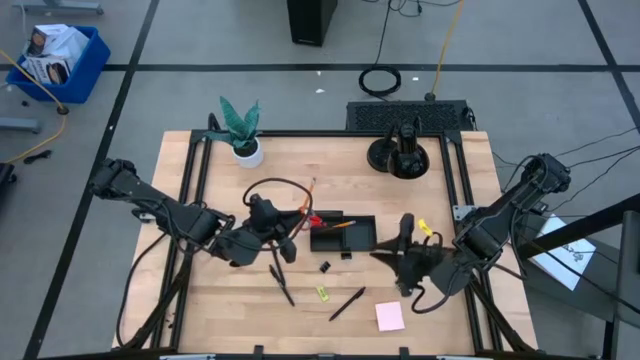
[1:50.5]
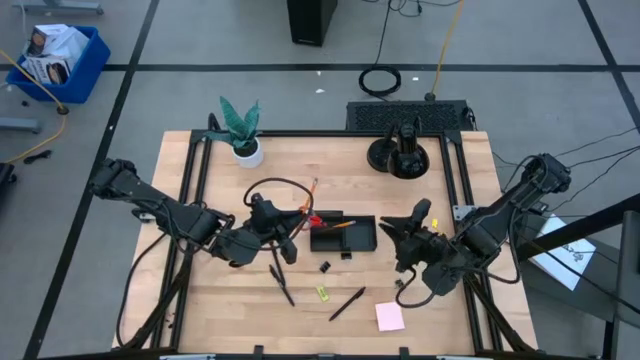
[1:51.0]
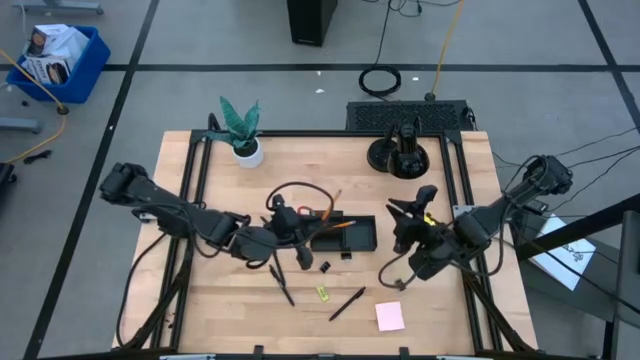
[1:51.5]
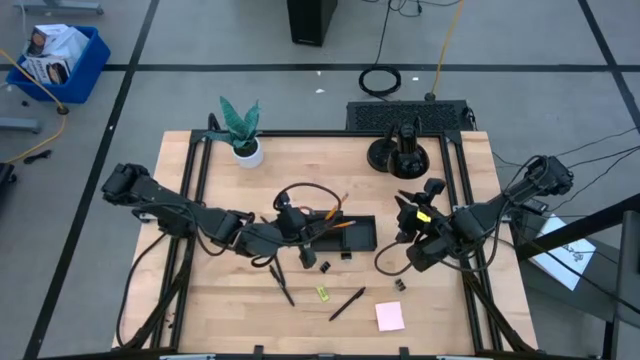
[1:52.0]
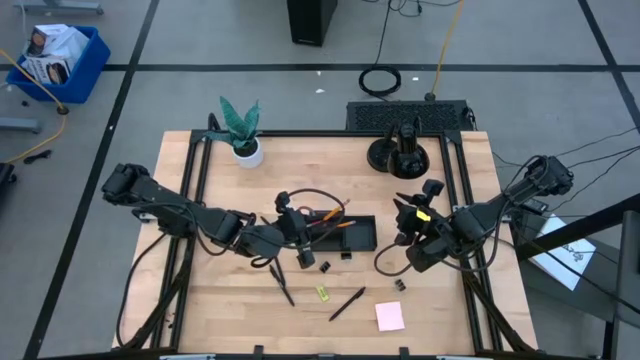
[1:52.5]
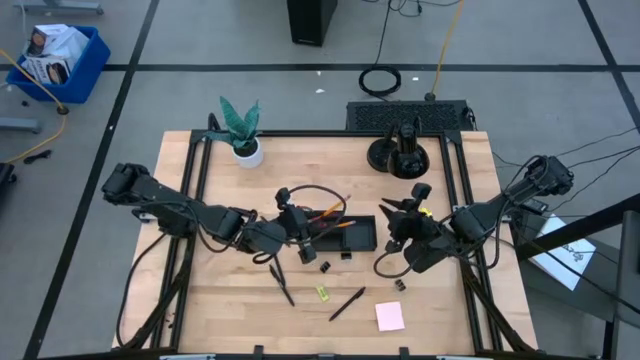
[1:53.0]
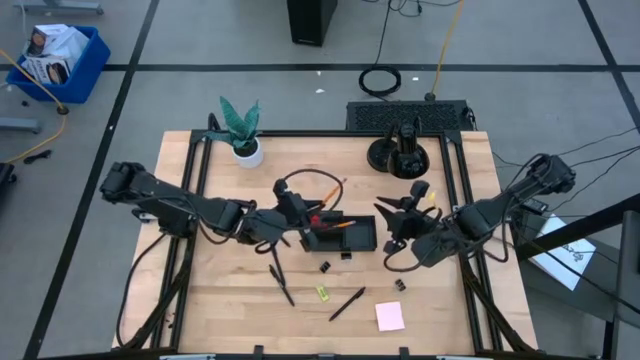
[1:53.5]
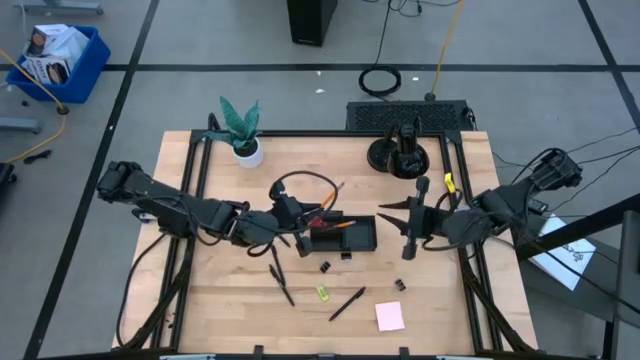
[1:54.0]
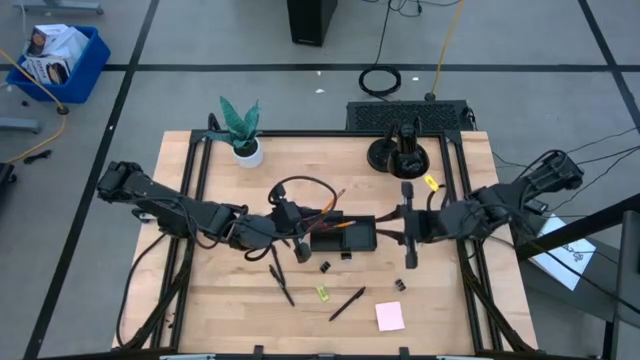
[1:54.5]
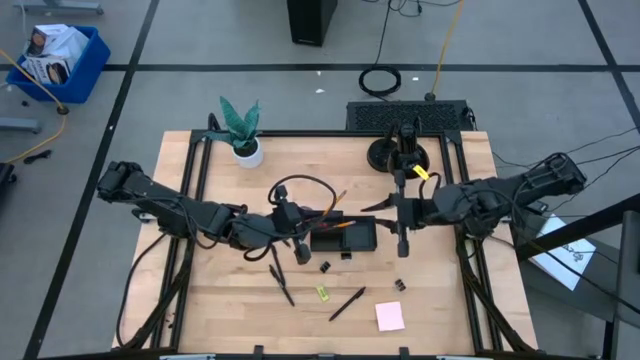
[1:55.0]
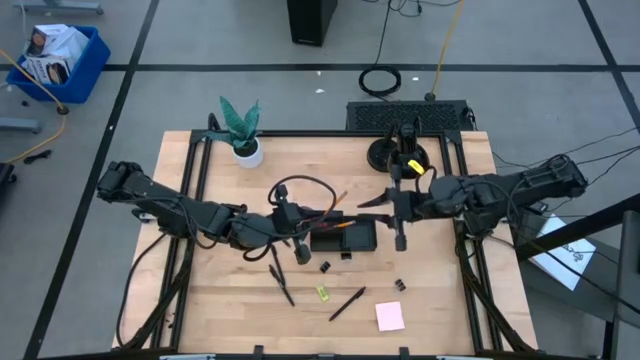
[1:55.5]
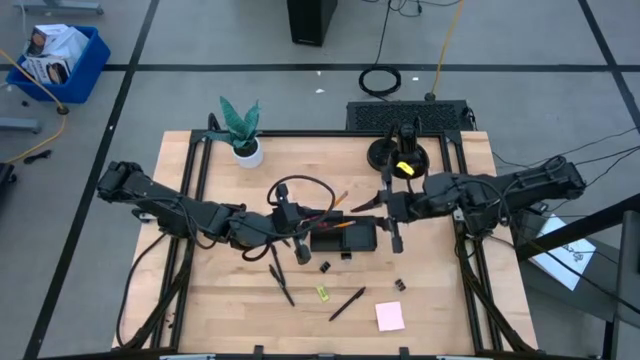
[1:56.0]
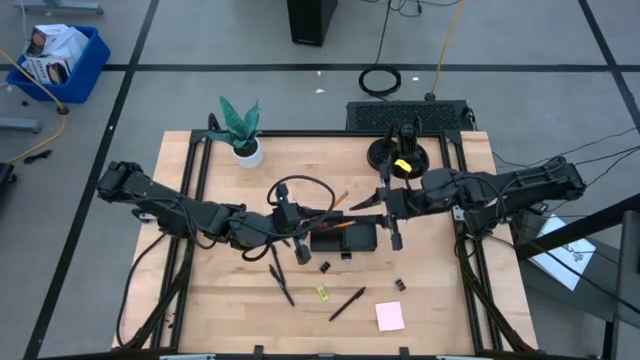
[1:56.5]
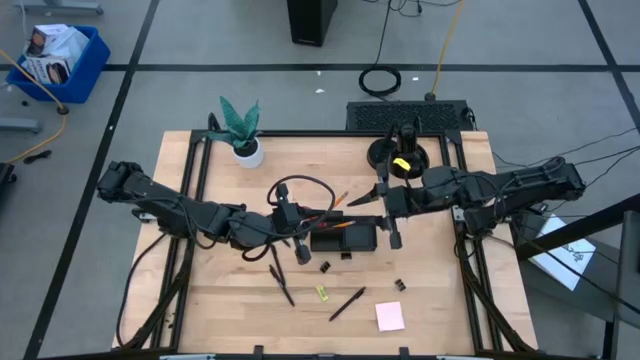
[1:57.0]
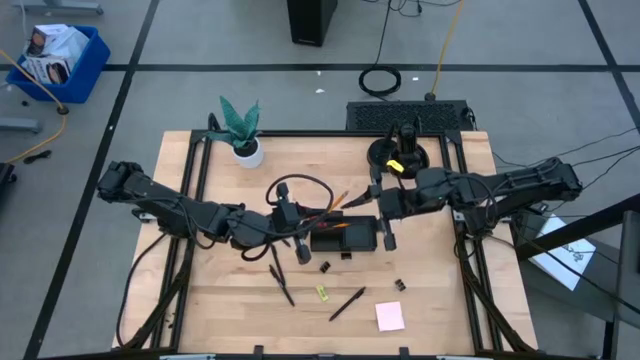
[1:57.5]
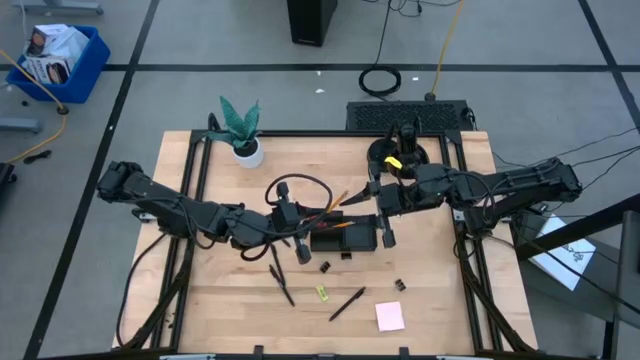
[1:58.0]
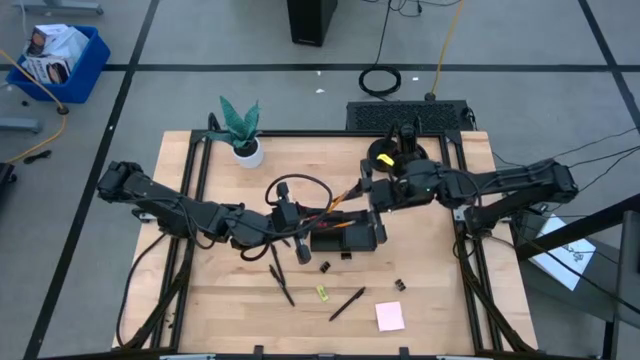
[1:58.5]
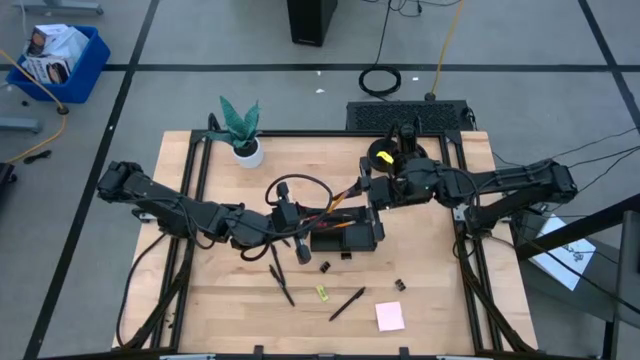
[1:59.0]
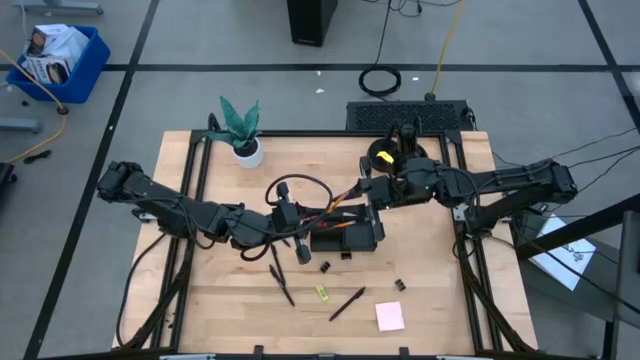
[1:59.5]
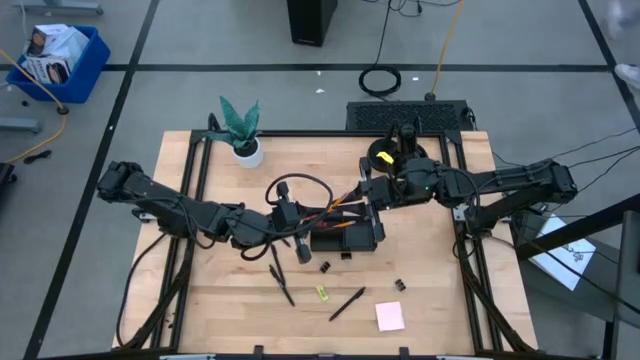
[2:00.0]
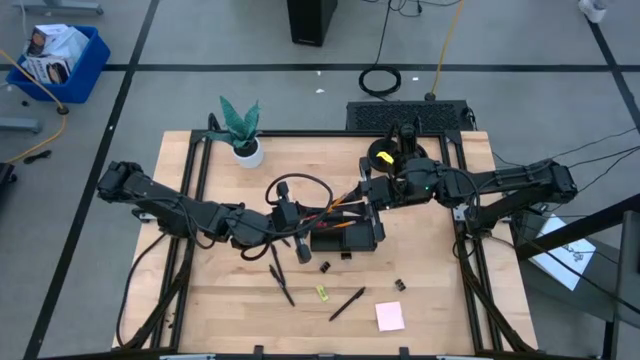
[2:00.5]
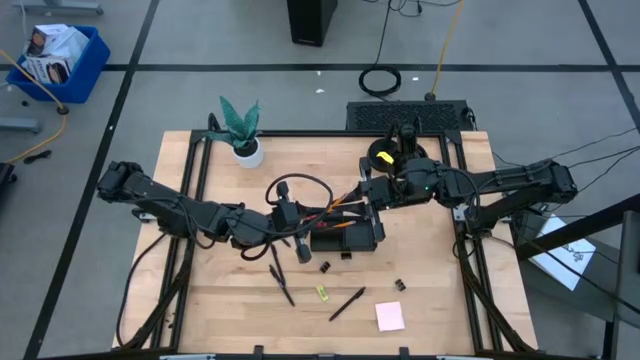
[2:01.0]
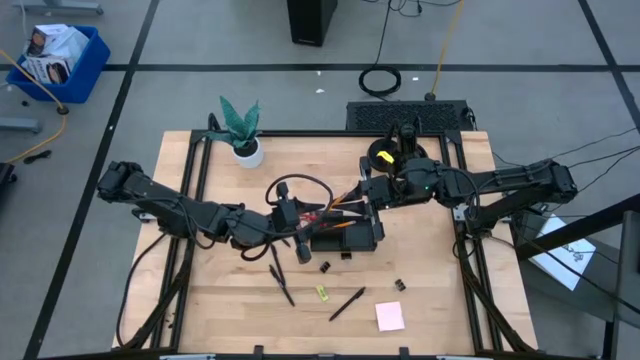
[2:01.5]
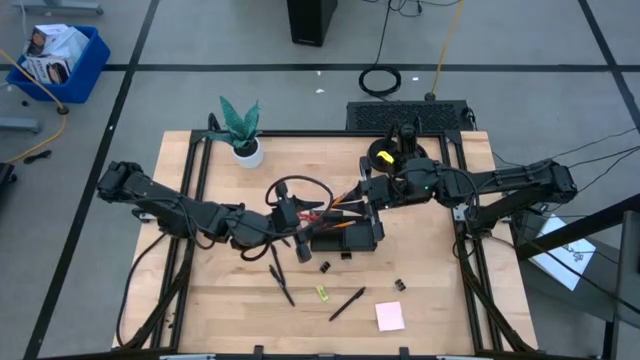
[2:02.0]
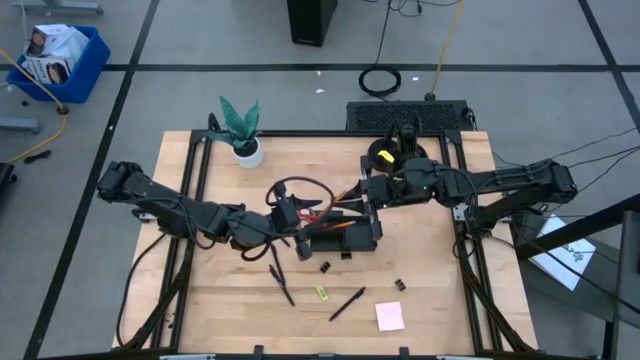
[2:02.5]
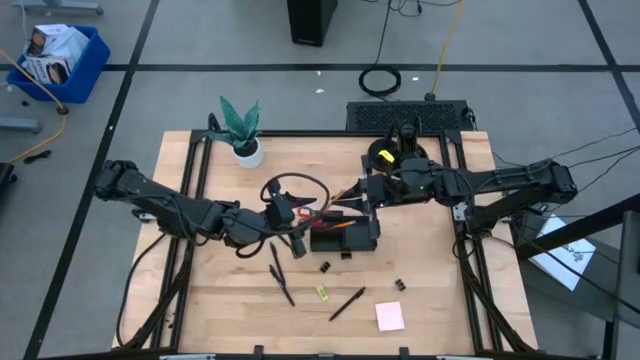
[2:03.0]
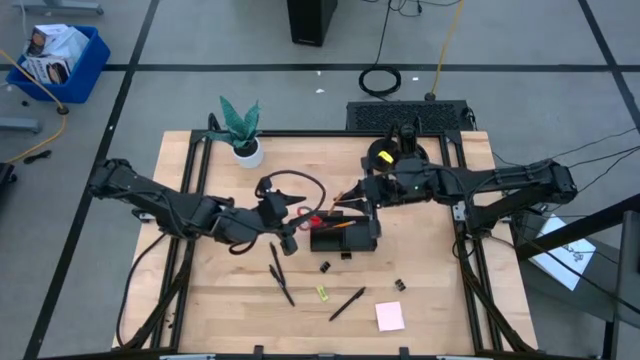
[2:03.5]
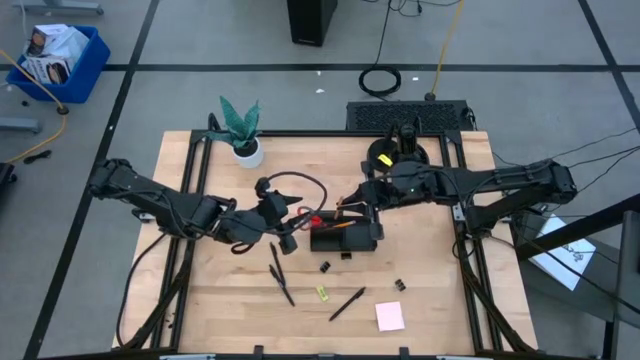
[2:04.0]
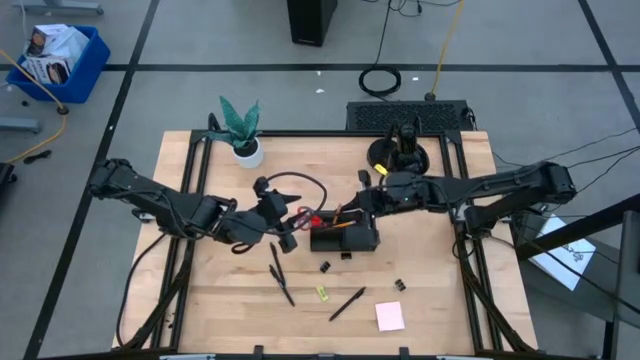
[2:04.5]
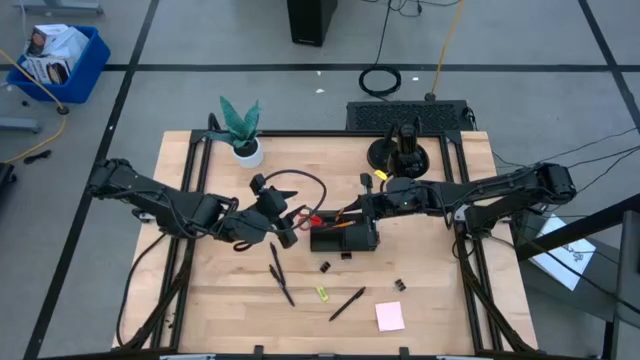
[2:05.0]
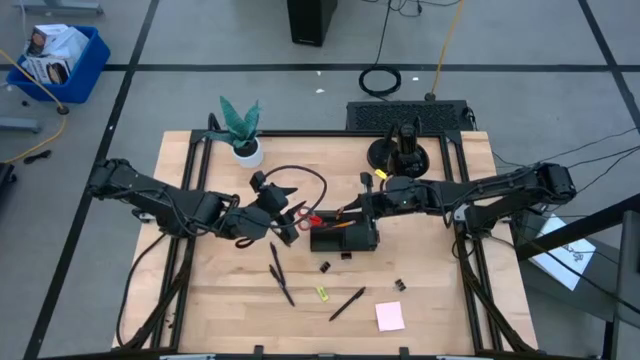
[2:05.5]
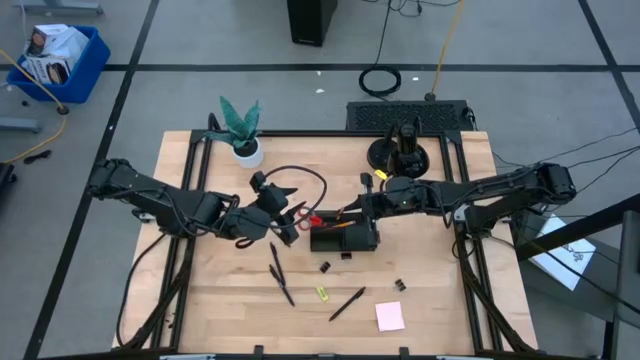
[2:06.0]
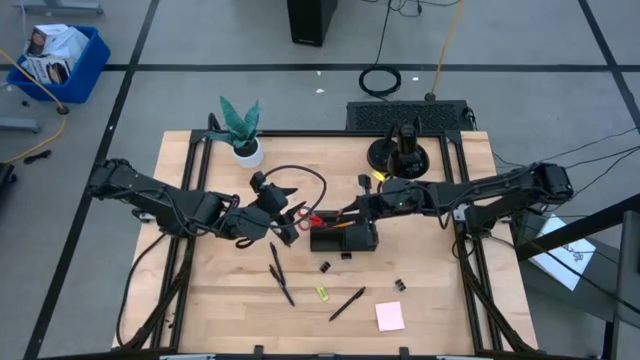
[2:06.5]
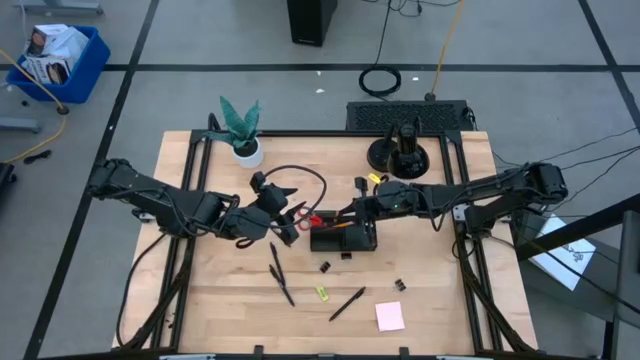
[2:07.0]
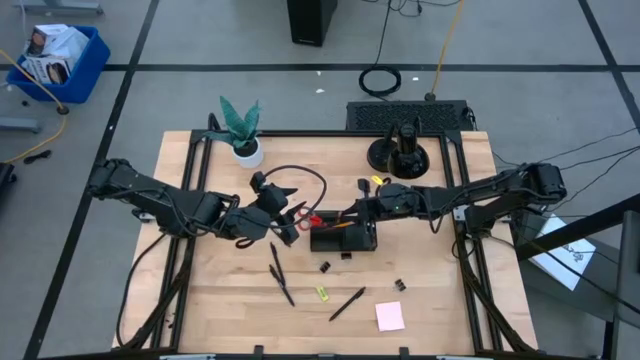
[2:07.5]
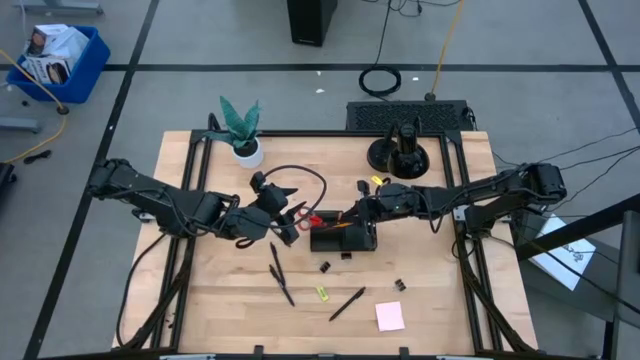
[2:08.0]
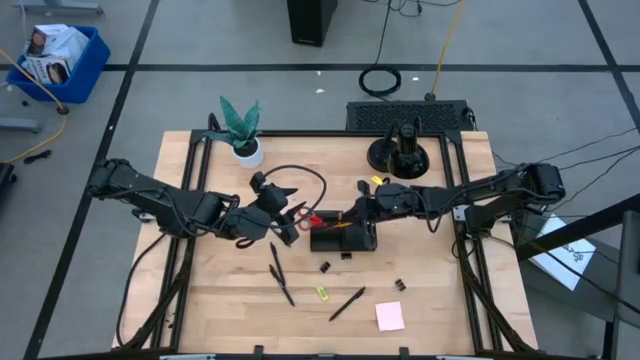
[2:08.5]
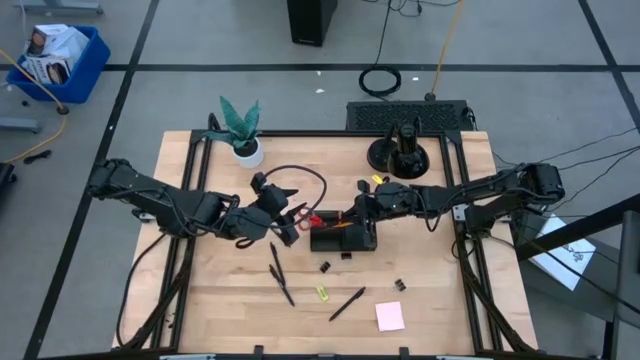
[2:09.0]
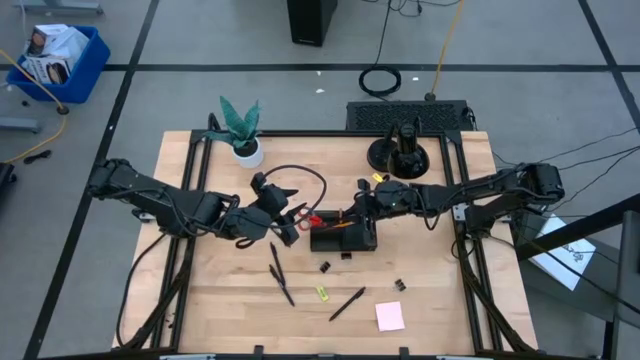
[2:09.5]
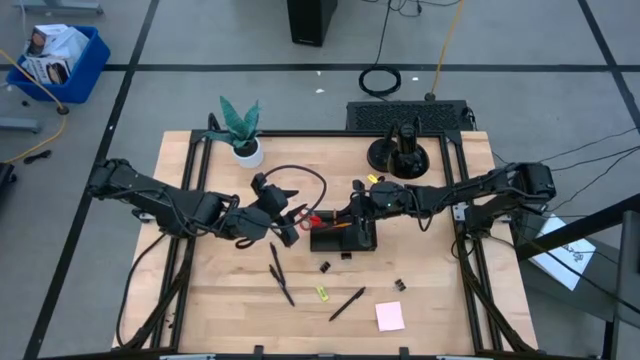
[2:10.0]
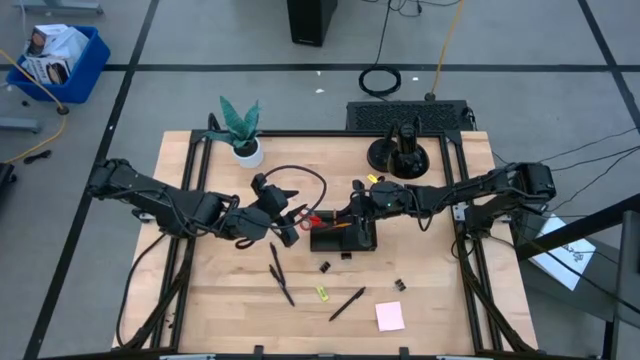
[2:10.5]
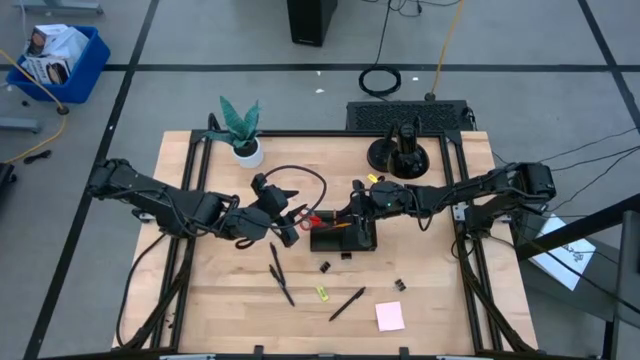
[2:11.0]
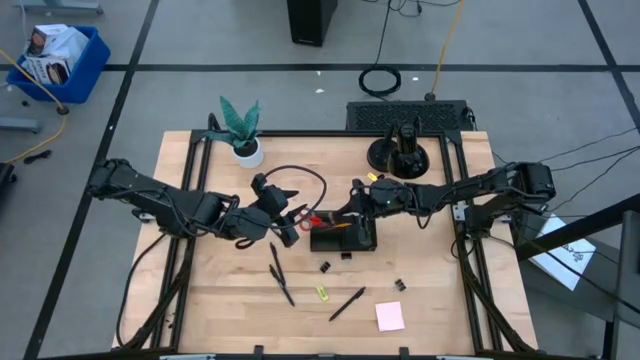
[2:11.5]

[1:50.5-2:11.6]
Task: Pick and place office supplies into organizer
Put the yellow pencil into the black desk organizer
